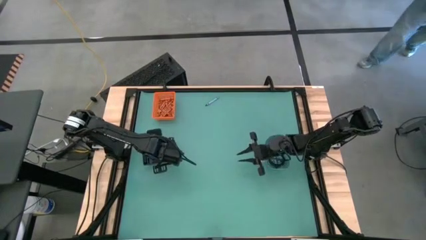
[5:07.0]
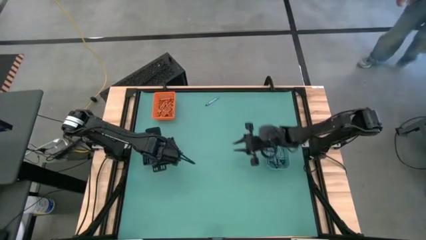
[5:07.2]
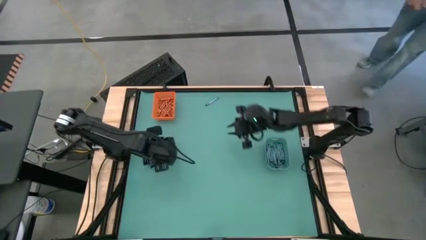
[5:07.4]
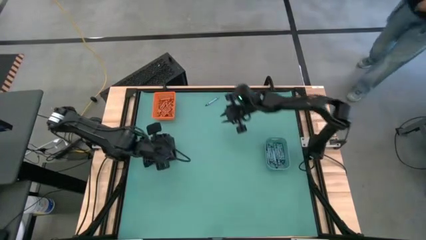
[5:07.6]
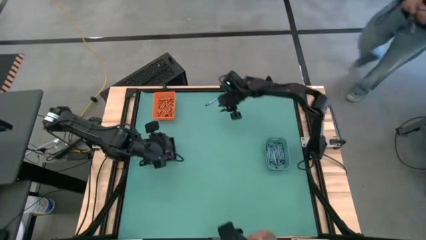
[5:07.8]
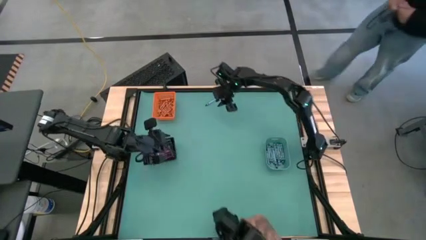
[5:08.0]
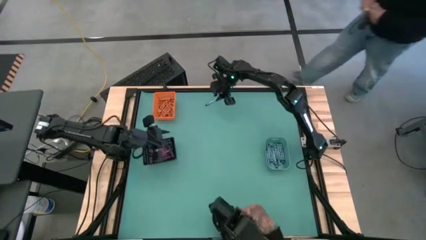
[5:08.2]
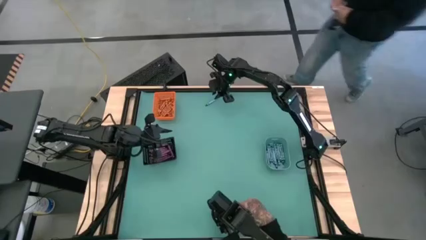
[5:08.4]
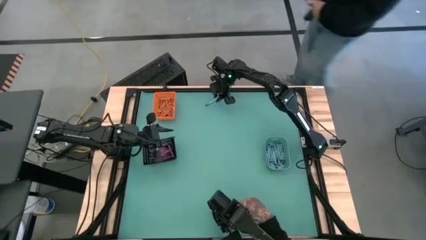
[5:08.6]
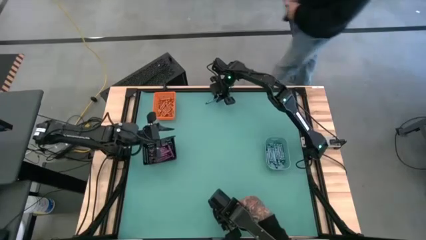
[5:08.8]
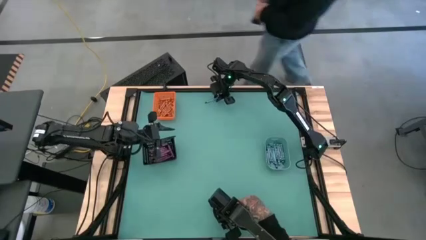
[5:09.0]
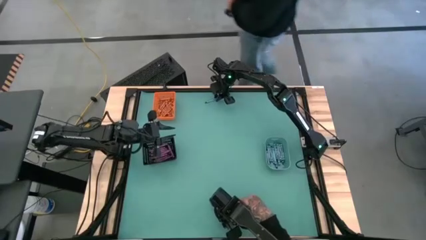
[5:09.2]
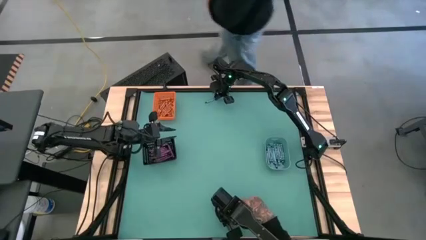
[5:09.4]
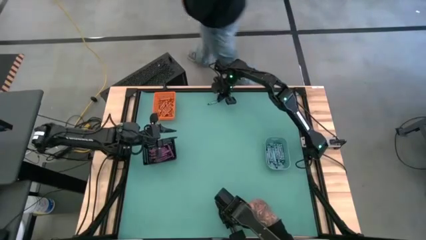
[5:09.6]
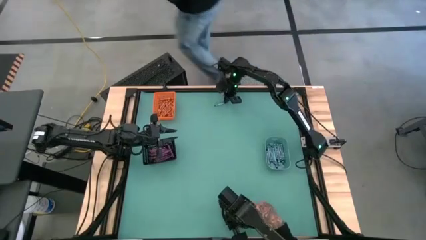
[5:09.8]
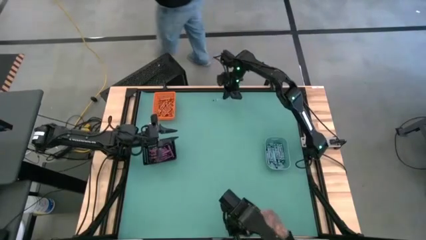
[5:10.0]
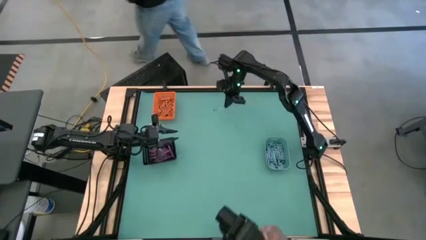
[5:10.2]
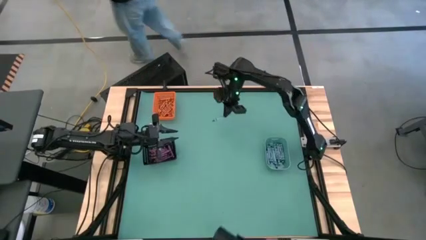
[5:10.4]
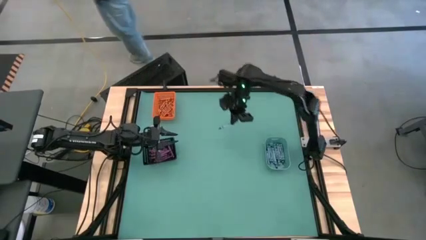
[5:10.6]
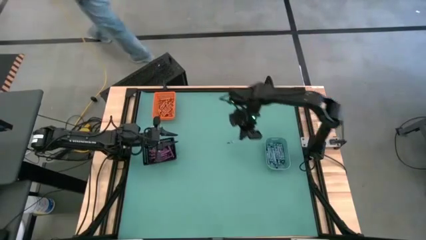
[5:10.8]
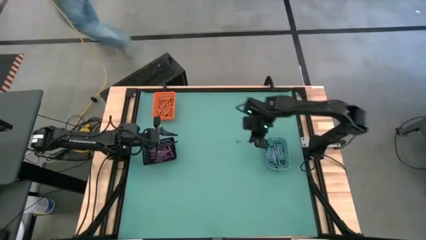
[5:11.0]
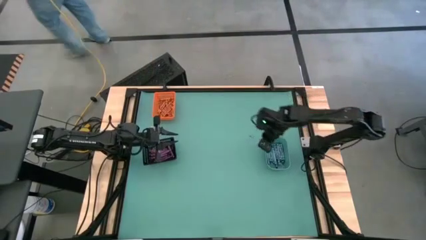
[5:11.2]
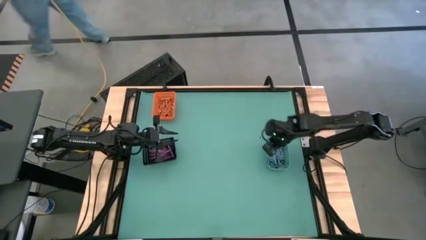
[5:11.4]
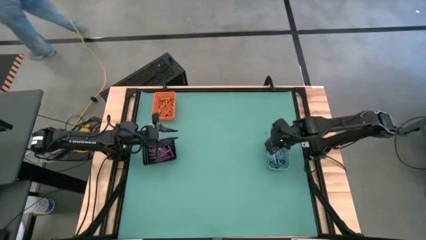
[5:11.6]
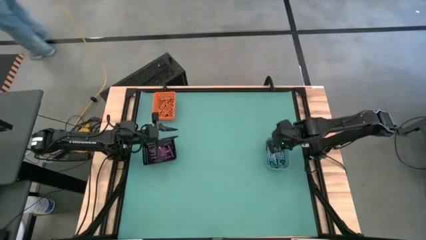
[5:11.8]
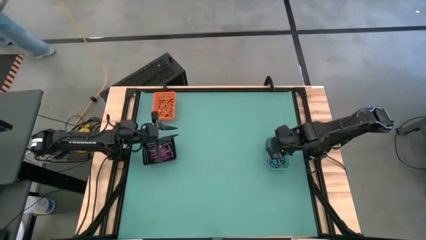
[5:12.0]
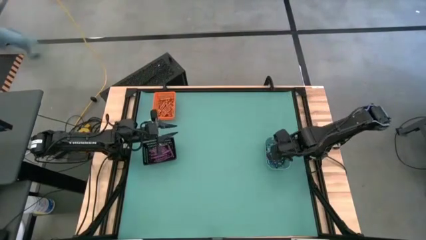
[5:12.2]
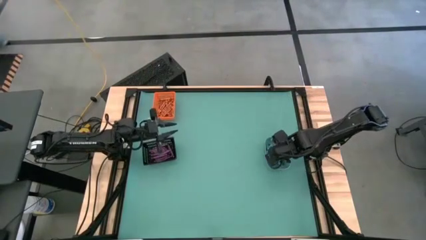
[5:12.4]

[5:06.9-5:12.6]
Task: Sort crayons
Put the blue crayon into the blue bin

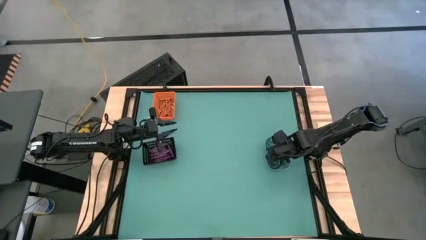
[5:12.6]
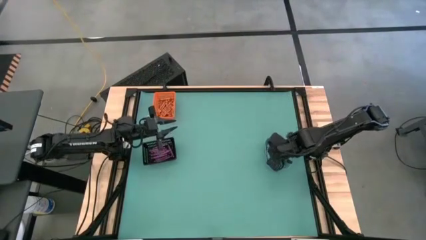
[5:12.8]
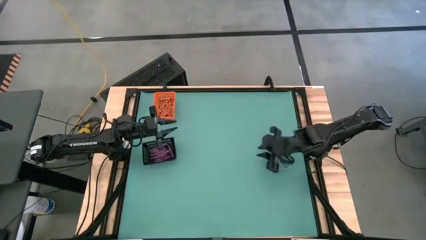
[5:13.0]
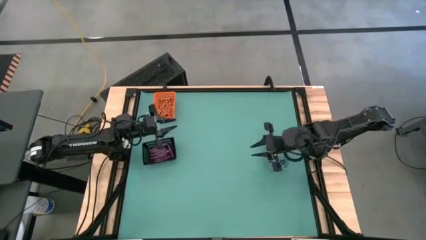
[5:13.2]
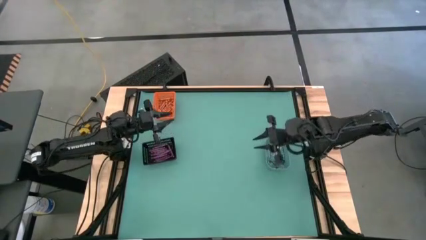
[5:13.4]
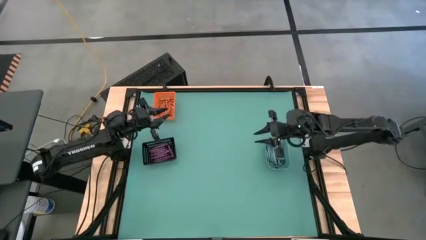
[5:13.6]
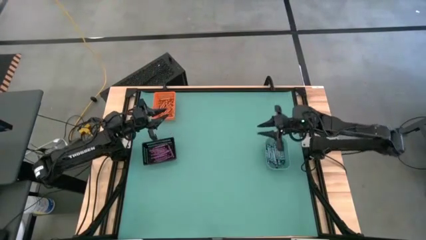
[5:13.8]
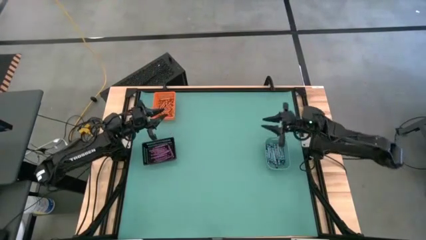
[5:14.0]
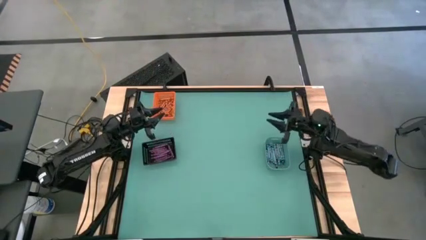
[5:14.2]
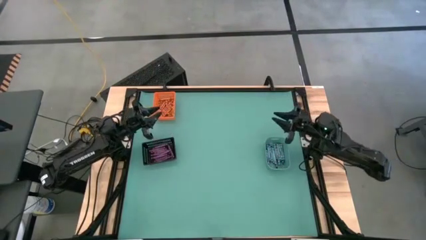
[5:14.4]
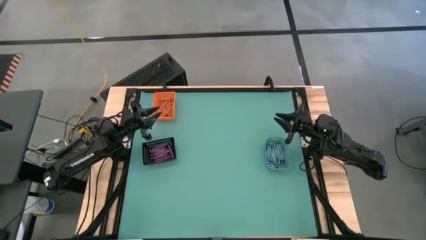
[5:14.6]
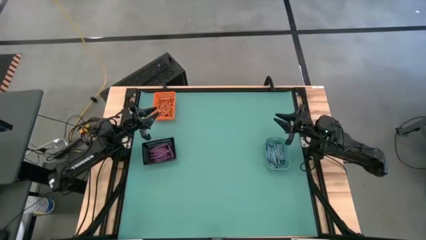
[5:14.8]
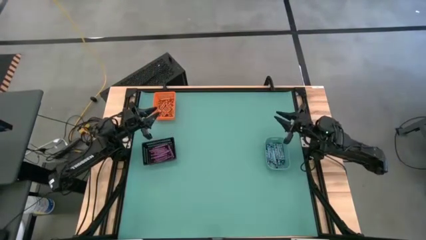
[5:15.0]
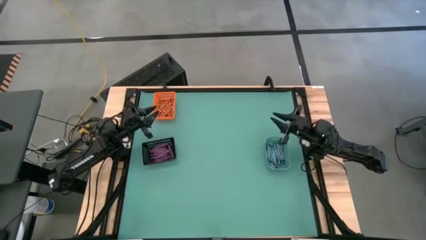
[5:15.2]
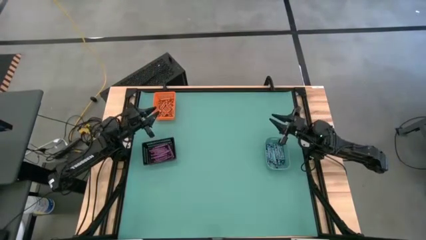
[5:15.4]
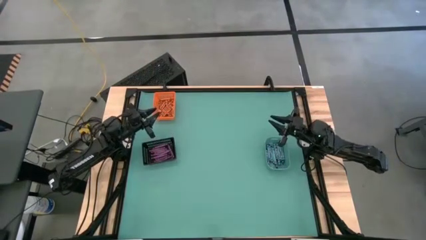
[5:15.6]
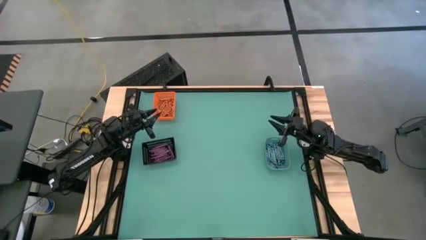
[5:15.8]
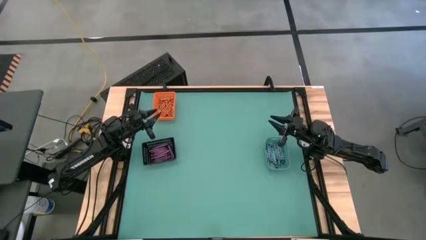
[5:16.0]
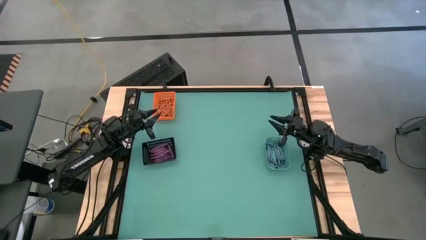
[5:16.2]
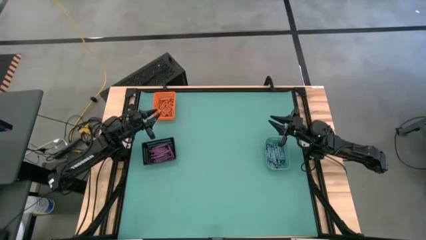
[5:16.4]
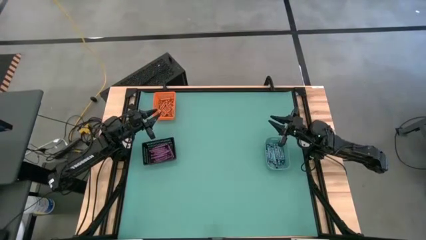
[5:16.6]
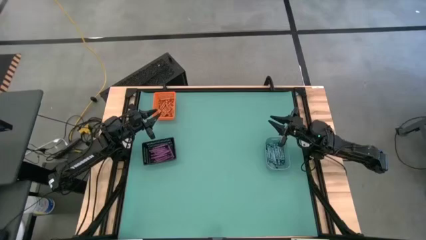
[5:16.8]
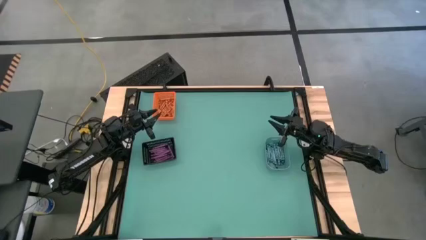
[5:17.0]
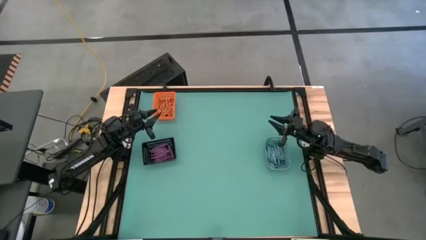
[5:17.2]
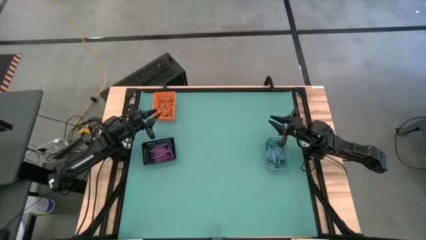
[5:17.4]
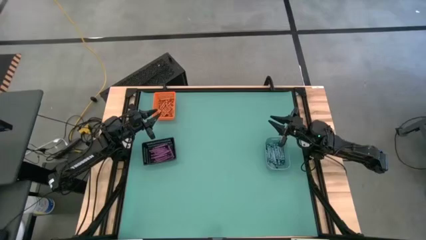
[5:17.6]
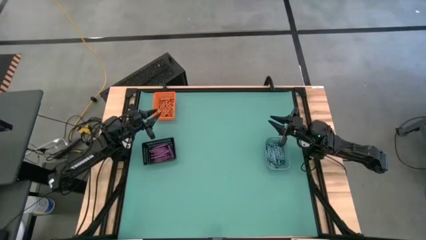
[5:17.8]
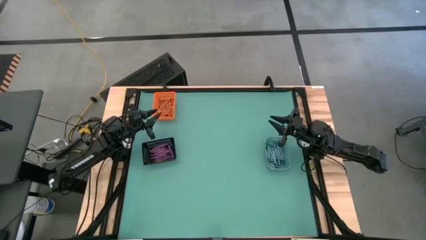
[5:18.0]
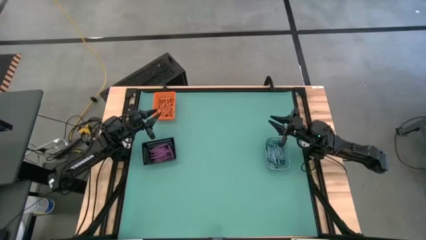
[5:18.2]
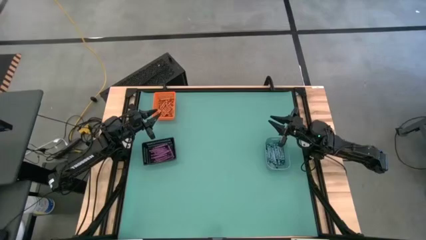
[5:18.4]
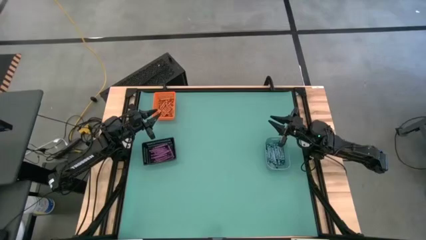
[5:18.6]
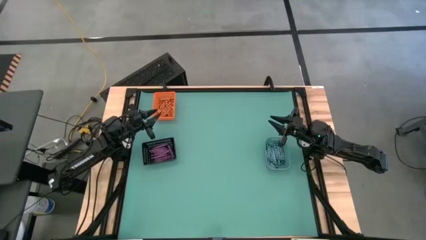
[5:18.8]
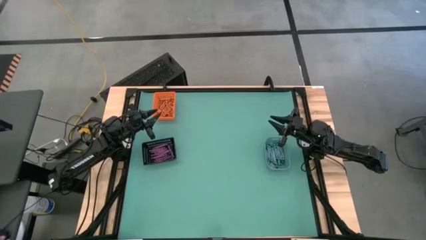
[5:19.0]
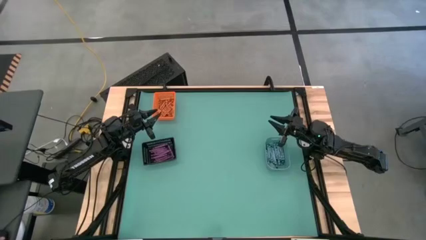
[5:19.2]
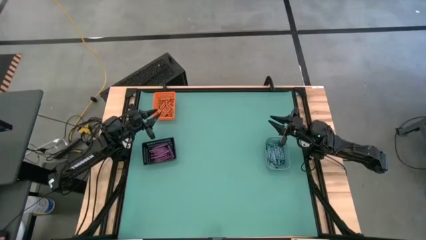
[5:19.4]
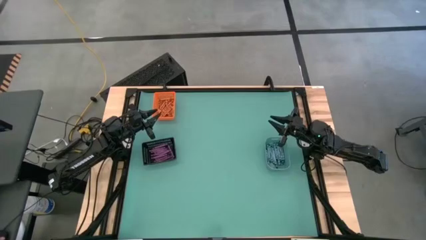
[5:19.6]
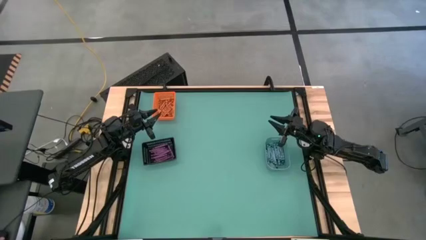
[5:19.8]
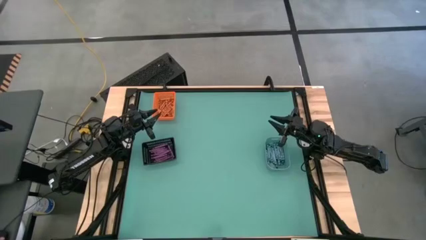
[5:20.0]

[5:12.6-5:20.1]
Return to Home Position

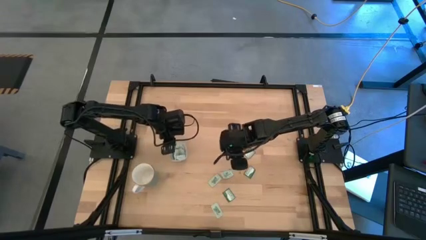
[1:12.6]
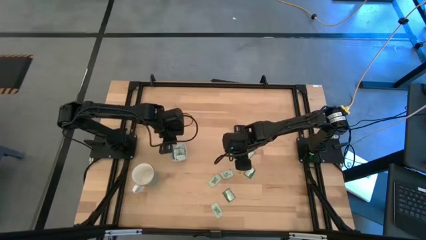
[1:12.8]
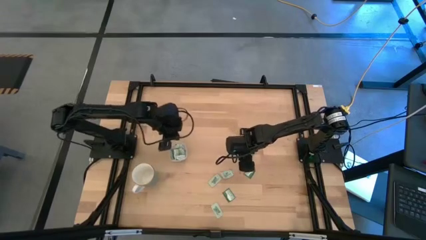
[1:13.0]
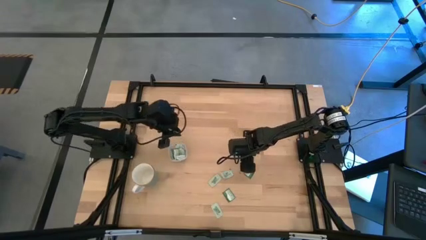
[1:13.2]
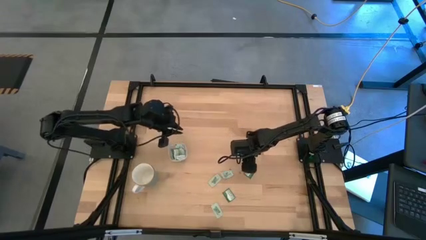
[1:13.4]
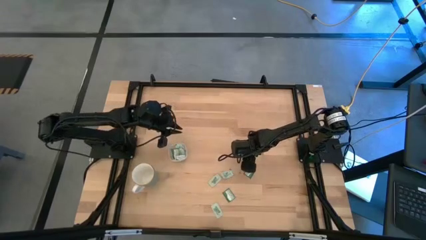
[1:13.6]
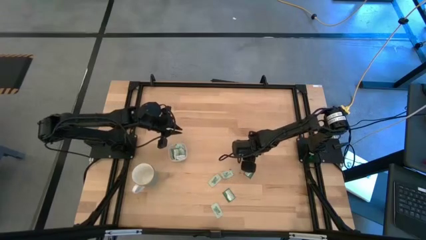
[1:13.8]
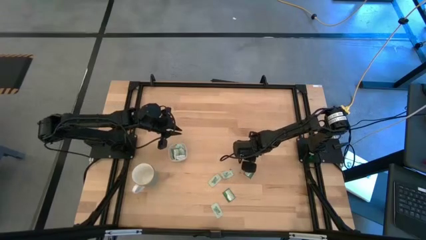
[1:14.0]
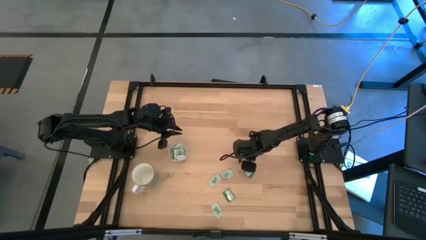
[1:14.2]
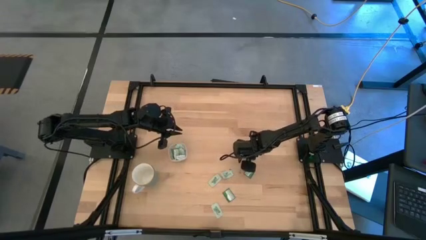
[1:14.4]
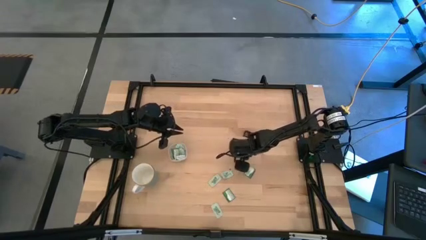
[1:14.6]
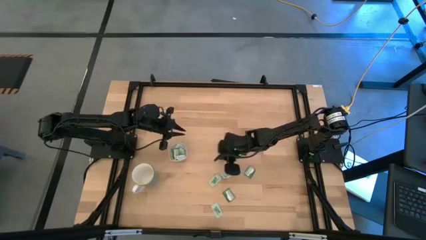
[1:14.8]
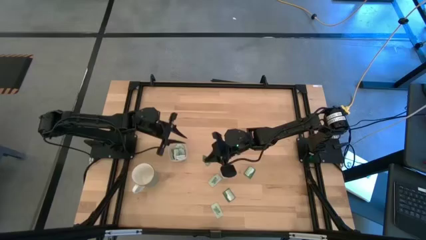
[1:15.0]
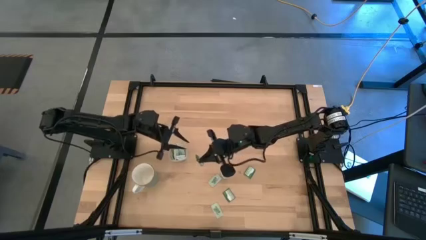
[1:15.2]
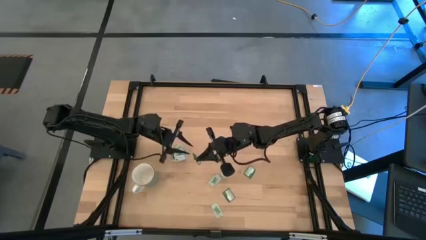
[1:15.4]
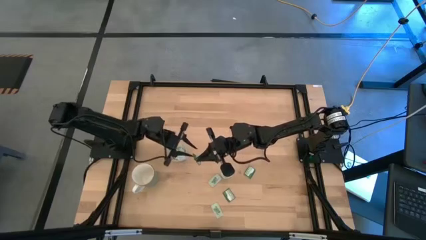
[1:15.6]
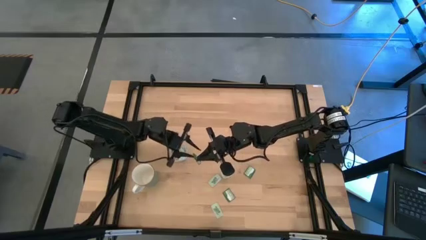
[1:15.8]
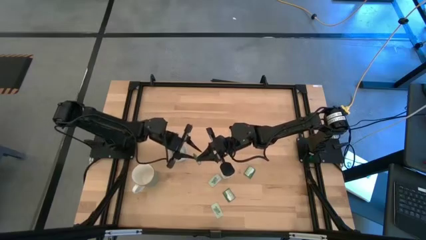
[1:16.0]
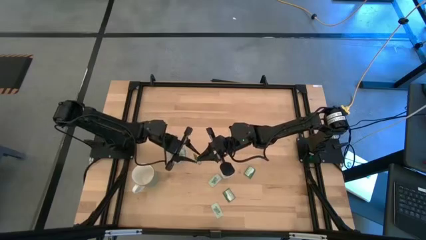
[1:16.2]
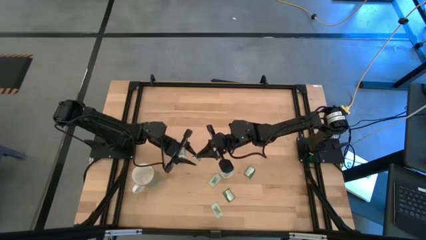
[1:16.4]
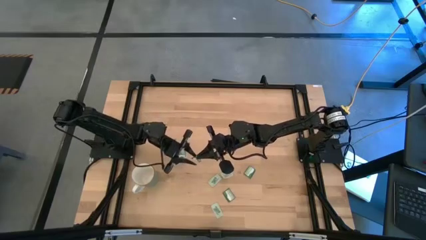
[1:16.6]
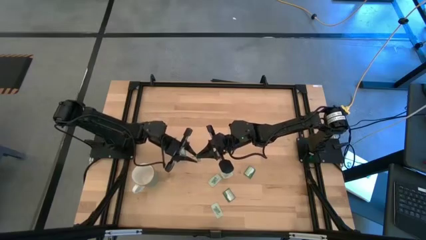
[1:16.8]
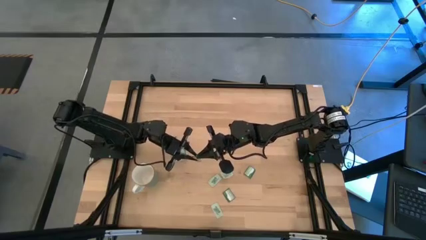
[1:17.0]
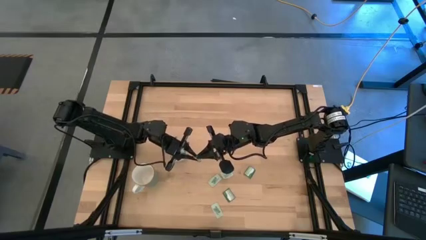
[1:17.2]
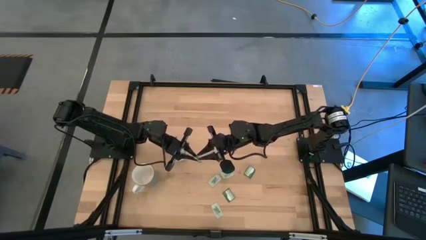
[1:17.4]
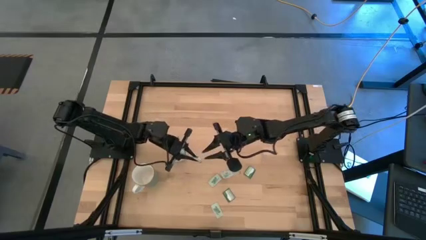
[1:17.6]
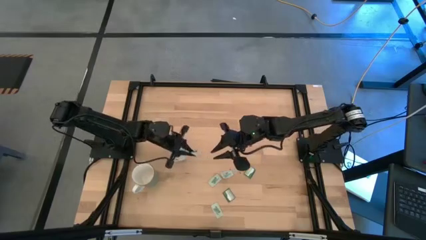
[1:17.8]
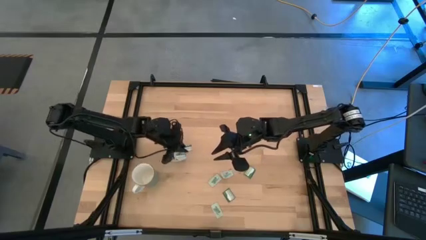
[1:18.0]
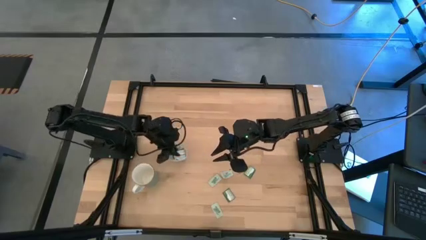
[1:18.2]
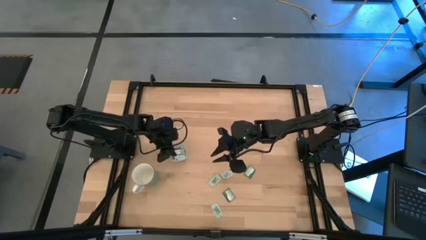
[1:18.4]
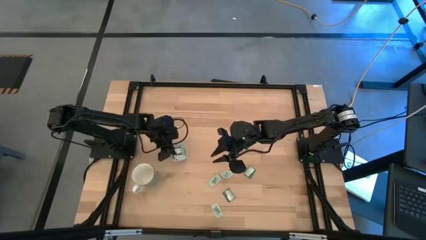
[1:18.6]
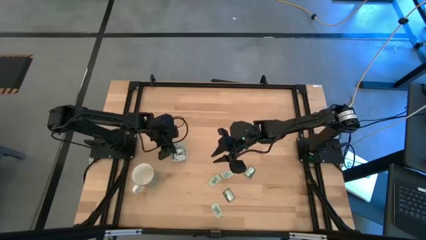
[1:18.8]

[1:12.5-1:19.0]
Task: Pick and place Stevia / Truvia into bins
Put the dark green stevia packet into the transparent container
